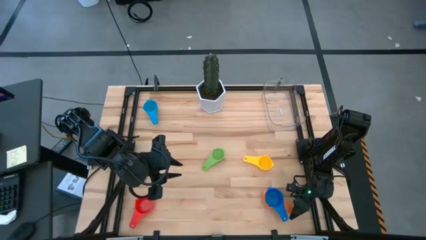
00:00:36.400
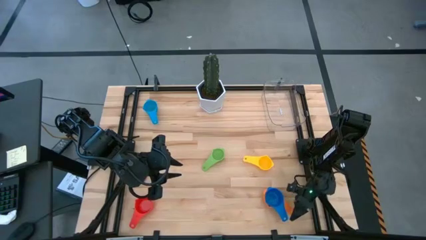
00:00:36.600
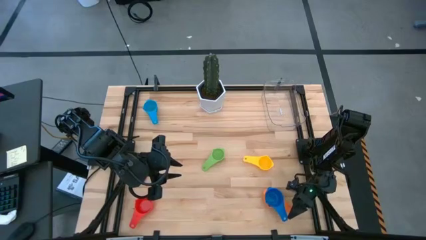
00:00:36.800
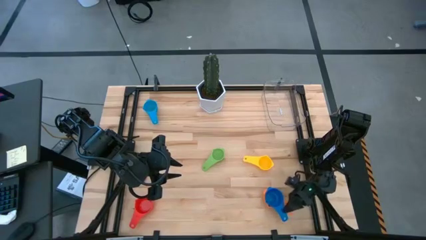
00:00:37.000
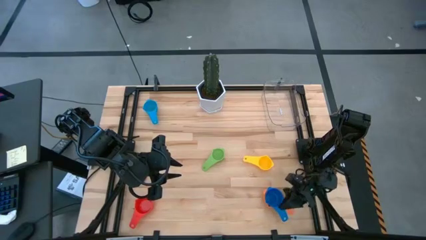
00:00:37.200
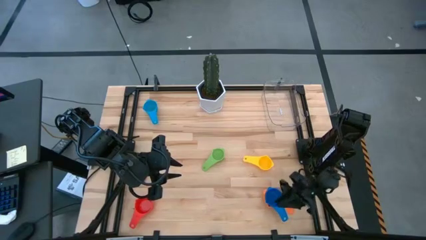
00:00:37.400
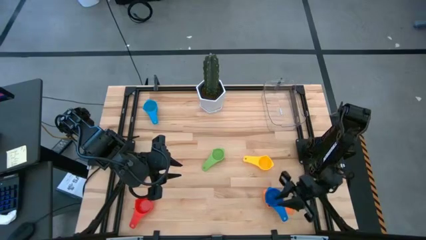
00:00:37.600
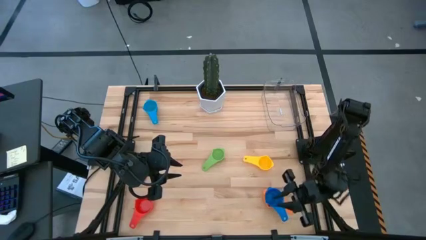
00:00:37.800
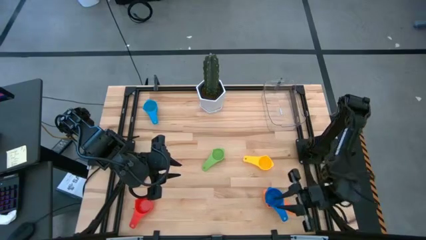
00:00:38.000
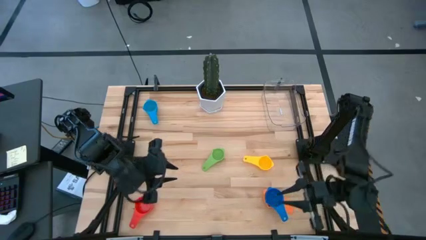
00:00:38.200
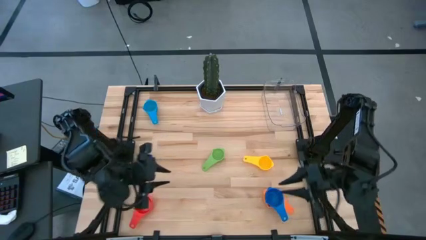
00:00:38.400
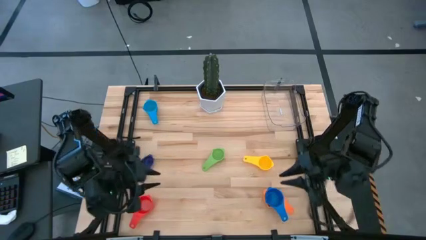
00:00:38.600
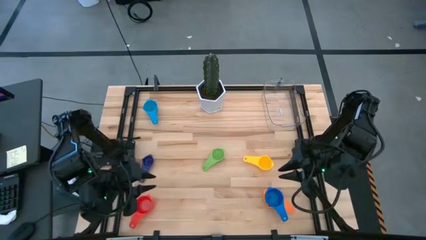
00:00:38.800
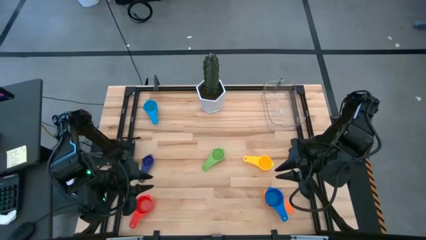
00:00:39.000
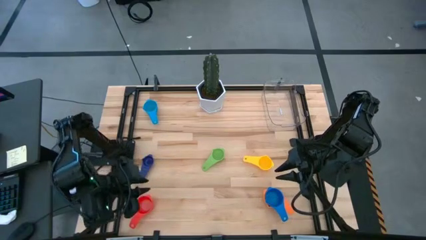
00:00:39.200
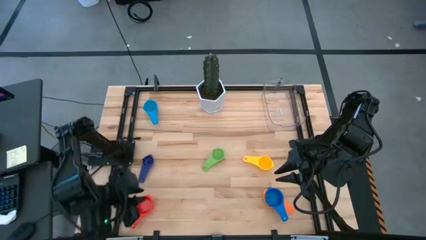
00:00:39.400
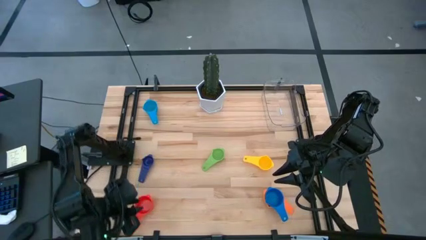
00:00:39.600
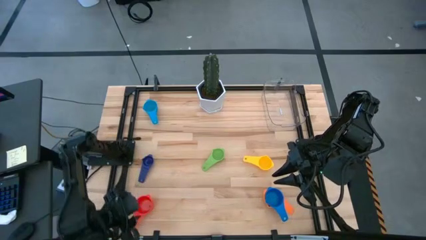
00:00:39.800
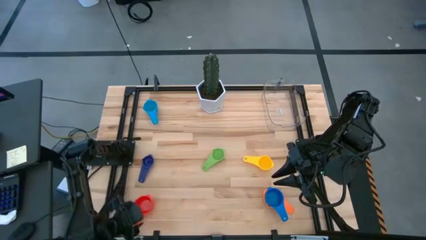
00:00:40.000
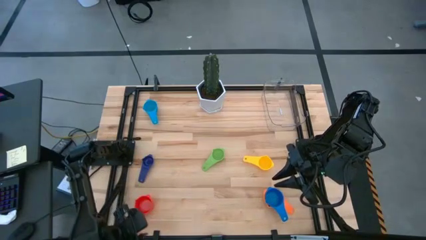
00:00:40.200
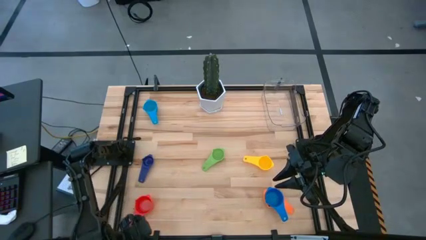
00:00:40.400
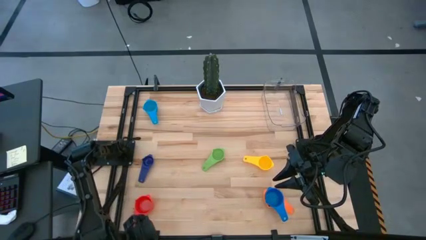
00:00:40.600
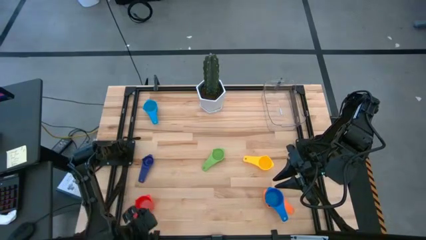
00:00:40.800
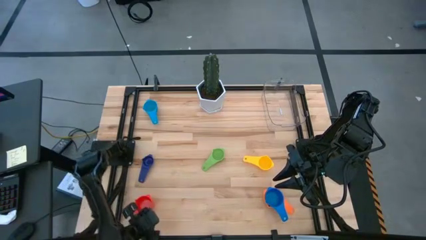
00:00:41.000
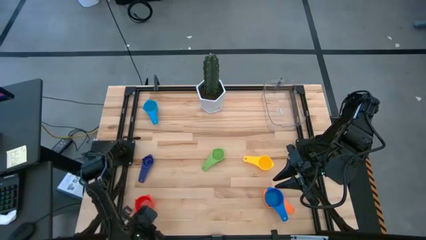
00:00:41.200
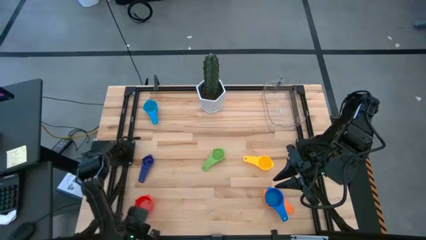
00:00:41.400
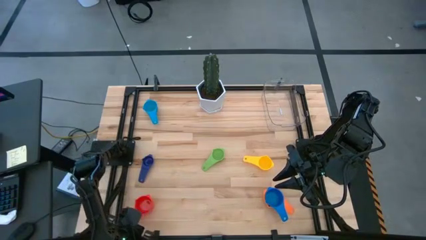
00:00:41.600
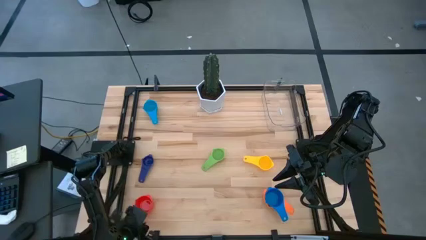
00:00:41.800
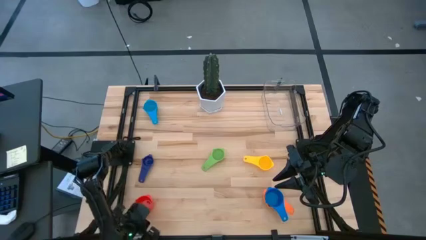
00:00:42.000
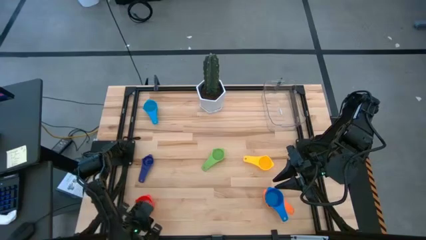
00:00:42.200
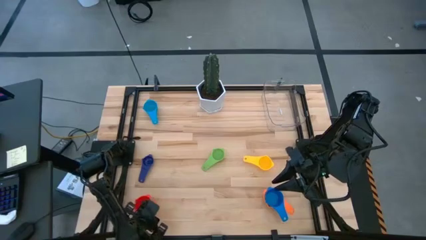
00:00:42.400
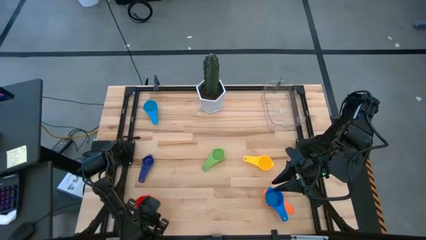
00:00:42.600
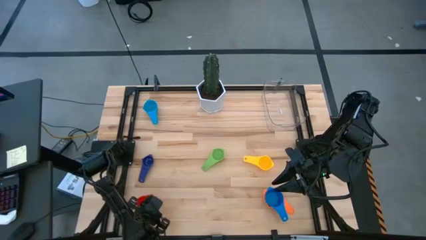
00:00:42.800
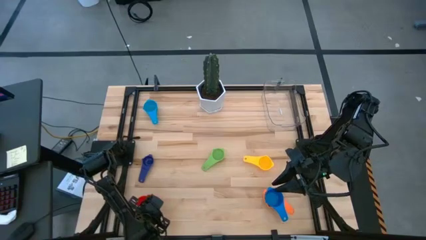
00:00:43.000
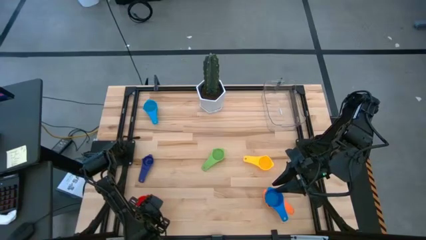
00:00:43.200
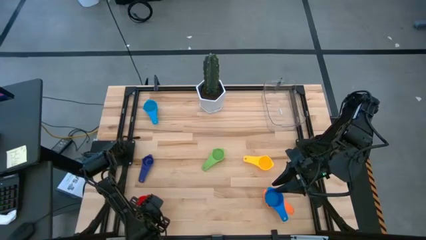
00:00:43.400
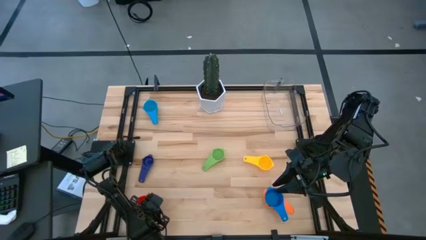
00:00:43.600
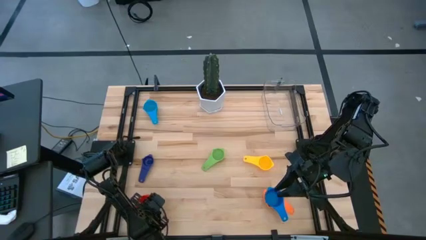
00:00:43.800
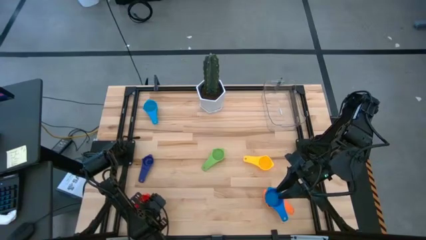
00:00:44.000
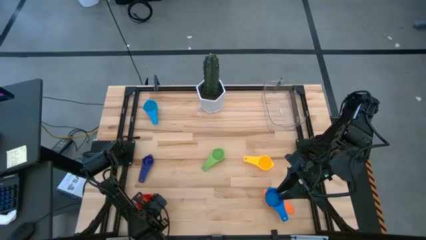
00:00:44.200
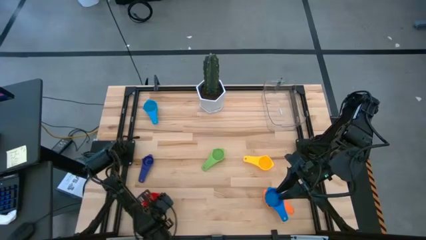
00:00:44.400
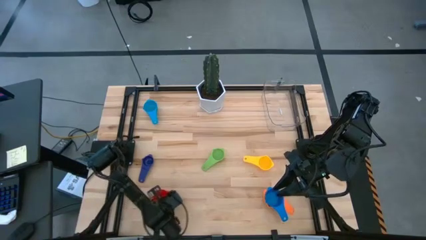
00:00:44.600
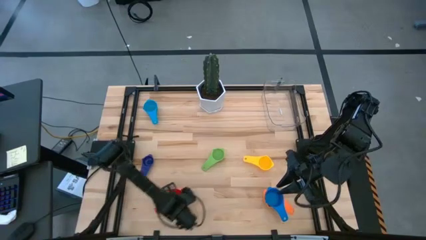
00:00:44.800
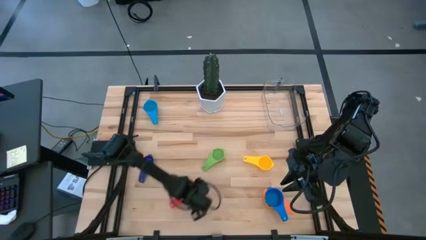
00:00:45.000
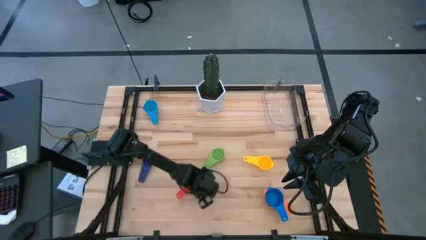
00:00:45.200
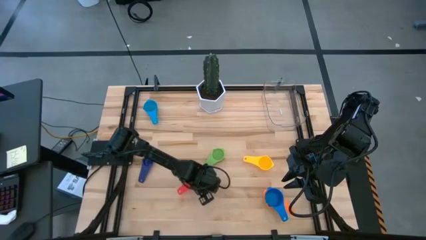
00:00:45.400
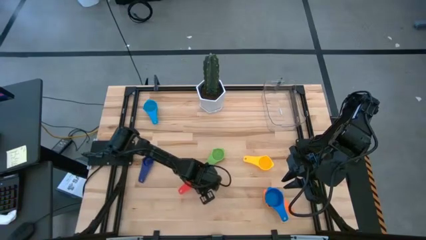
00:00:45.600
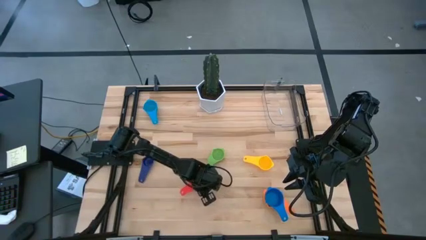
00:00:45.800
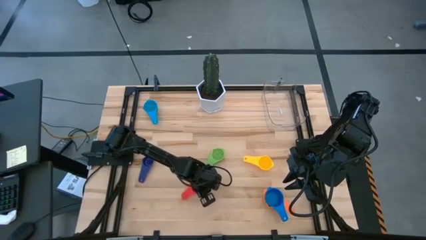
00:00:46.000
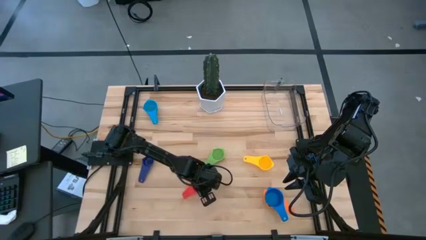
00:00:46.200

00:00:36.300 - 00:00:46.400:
Task: Nest measuring cups in basket
Move the red measuring cup to the center of the table

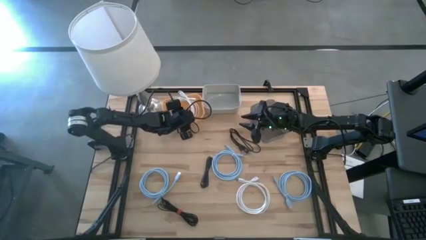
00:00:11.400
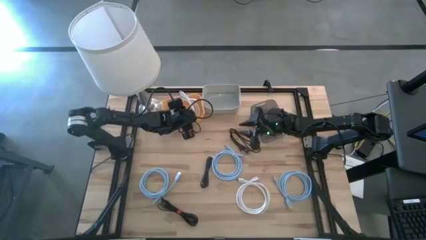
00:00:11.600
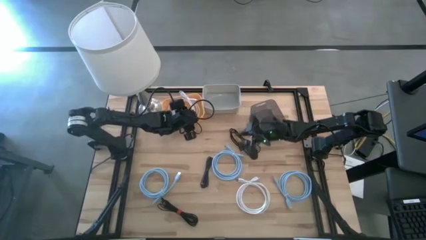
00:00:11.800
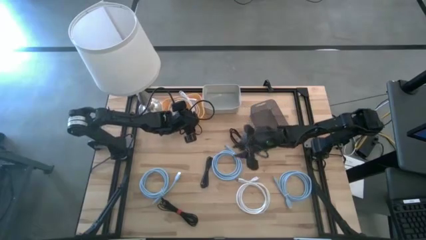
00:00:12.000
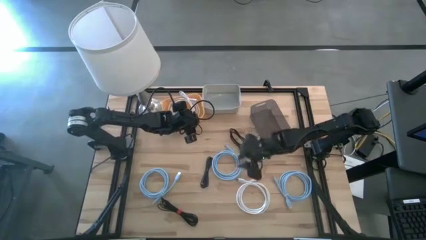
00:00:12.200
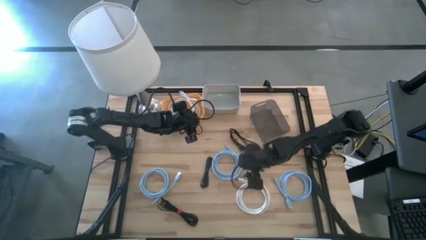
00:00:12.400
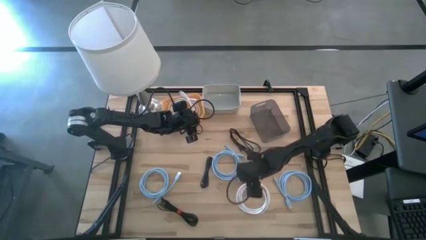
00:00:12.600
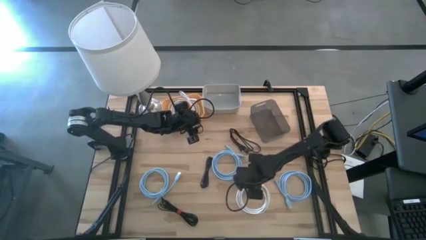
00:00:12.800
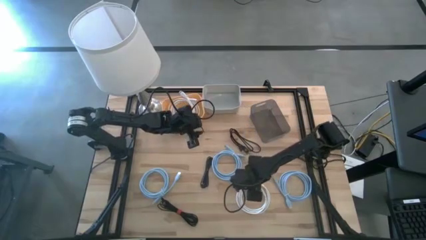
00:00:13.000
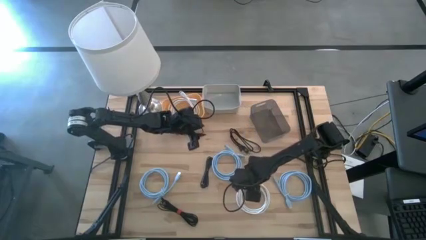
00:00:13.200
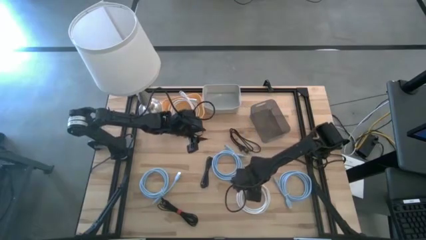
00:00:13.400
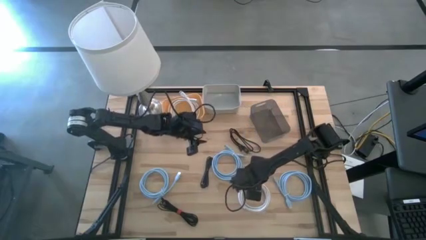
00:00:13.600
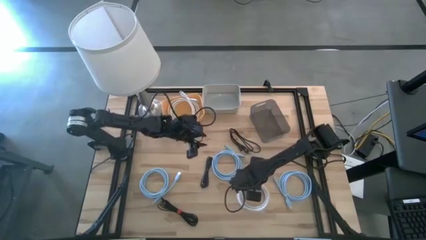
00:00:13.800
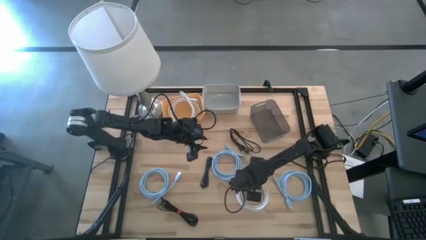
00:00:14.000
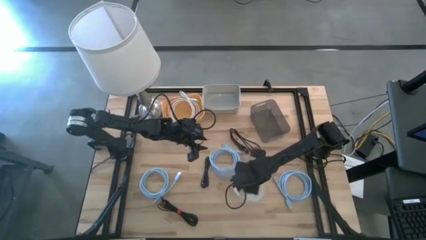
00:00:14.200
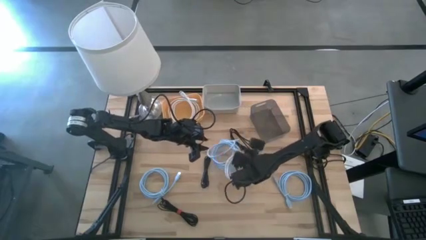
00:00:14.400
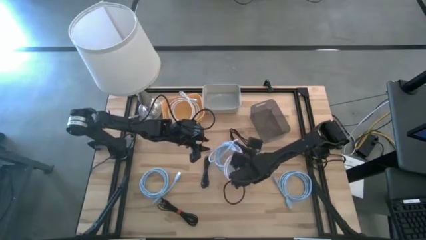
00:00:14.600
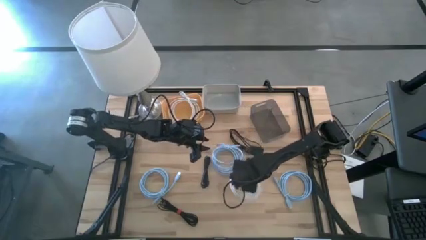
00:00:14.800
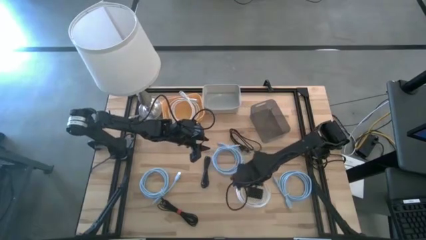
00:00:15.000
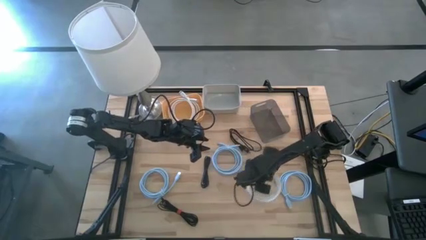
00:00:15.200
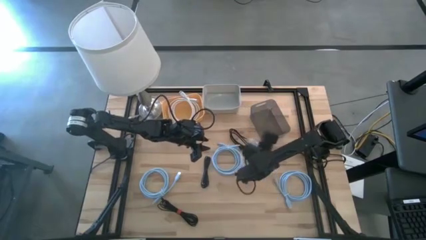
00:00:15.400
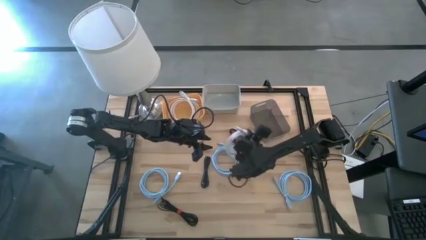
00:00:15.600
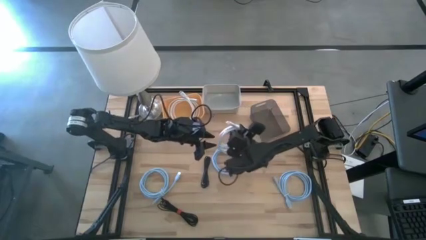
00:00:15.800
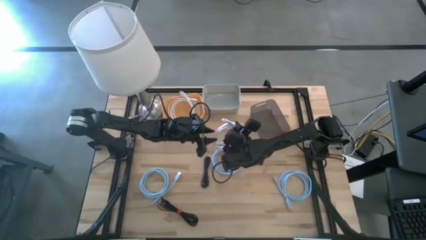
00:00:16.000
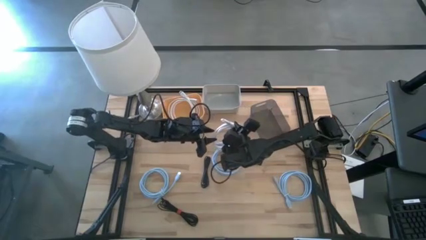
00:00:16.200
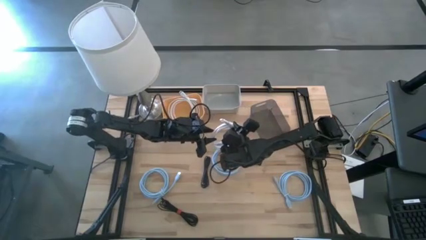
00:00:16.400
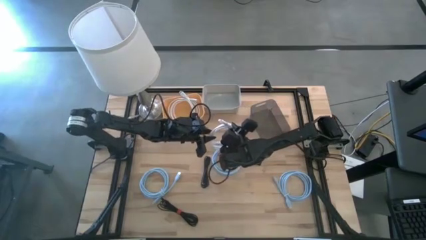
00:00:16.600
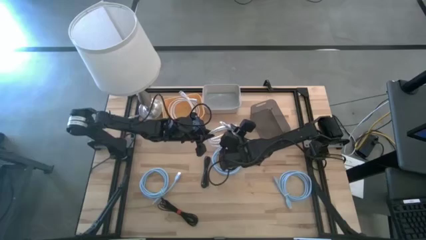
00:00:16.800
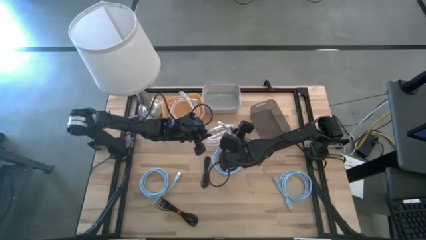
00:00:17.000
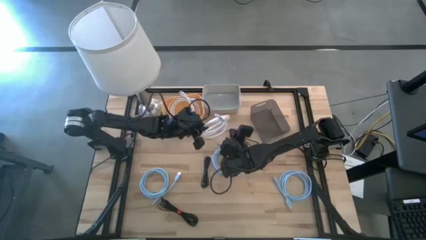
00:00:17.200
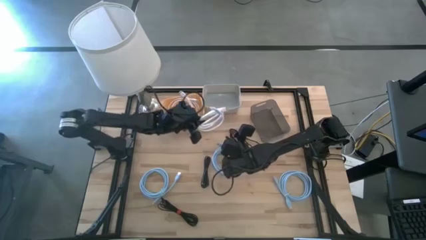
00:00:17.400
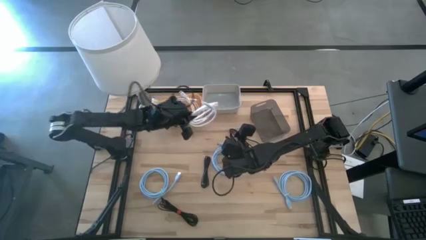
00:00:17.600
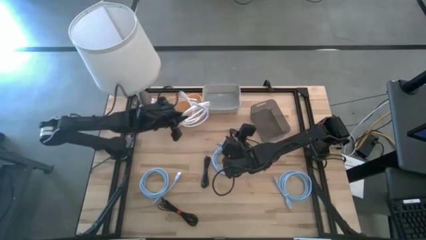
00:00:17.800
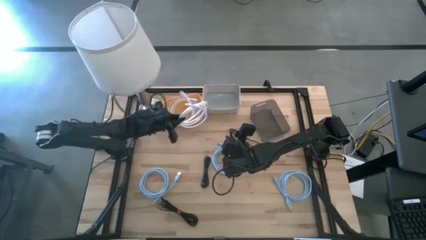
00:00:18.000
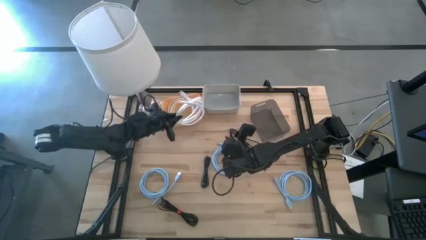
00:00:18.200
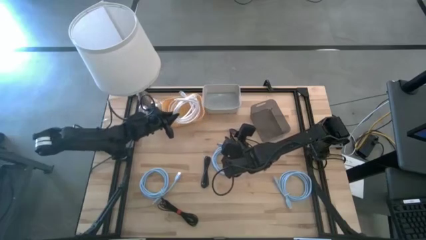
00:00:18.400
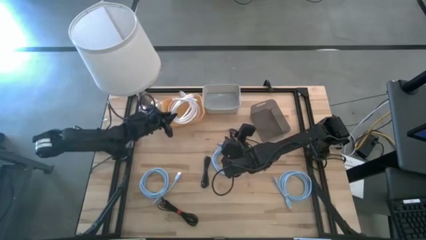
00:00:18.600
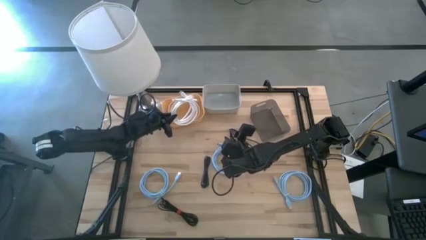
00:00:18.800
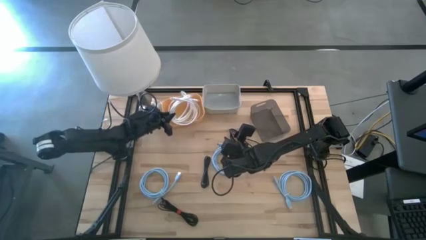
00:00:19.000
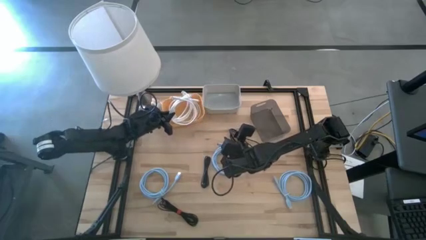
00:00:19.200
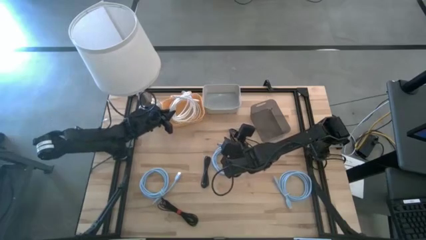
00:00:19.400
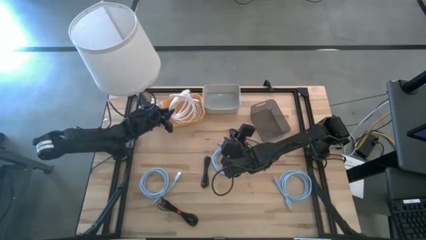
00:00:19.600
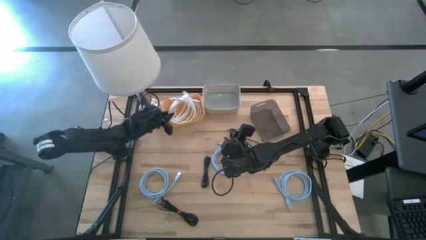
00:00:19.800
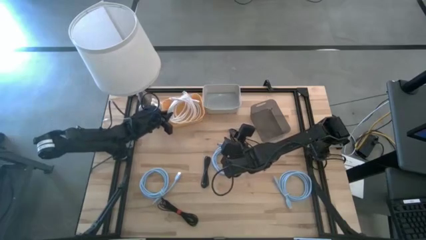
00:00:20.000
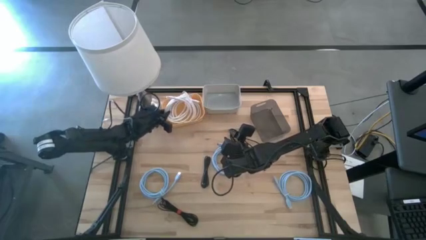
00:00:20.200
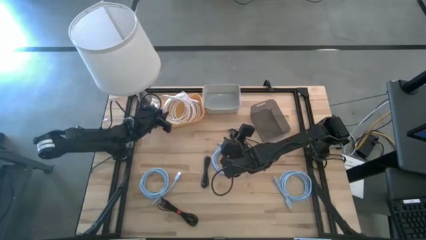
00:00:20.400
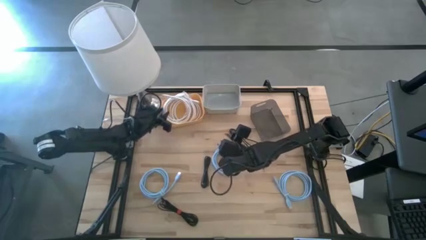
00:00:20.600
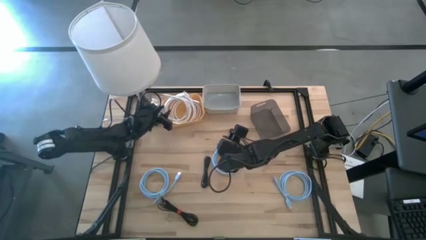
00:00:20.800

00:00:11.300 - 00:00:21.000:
Task: Pick & Place USB Port
Put the white display cable into the yellow bin
